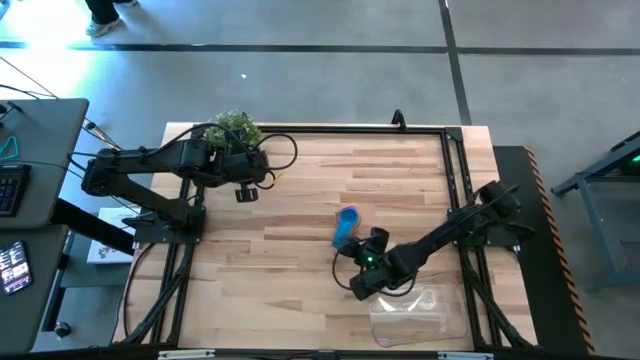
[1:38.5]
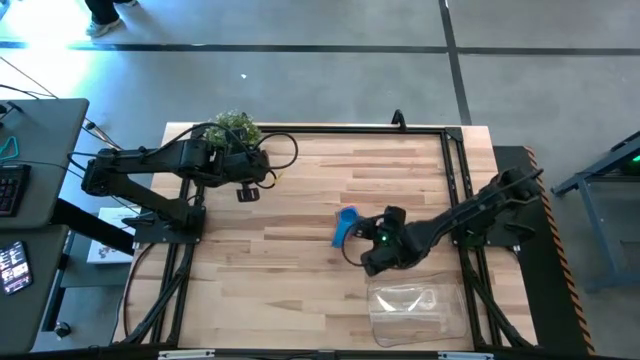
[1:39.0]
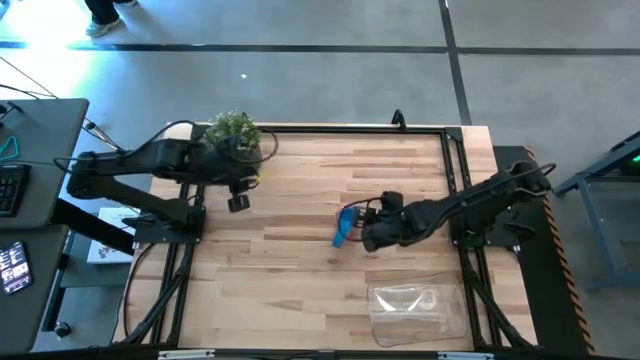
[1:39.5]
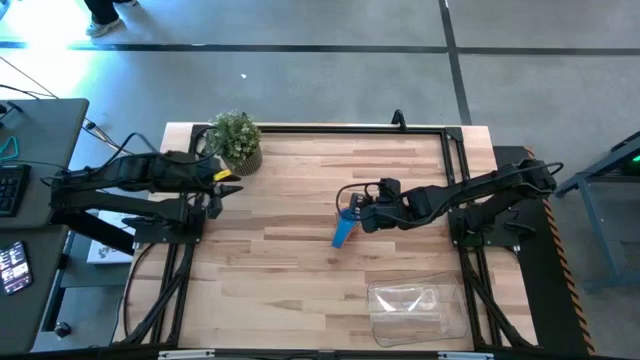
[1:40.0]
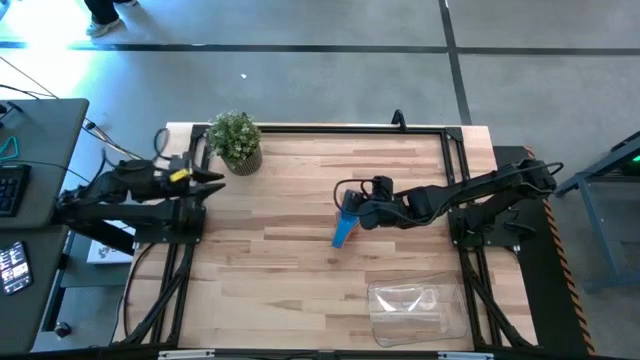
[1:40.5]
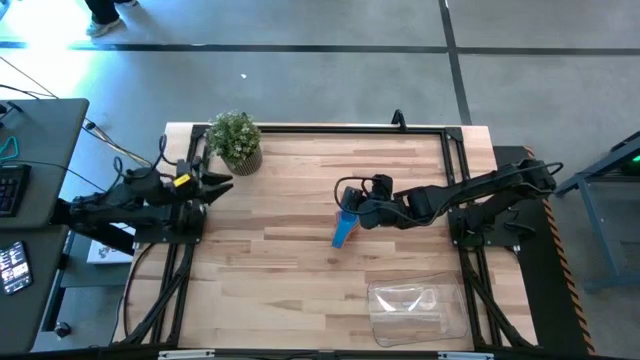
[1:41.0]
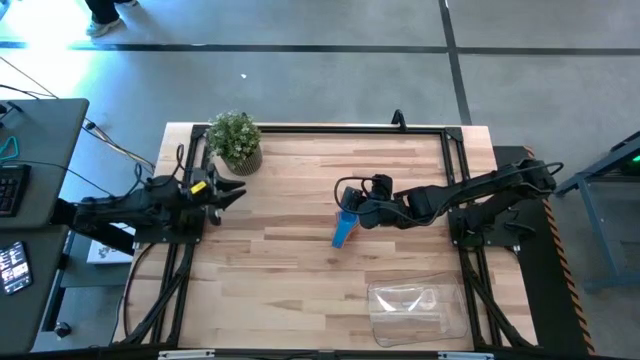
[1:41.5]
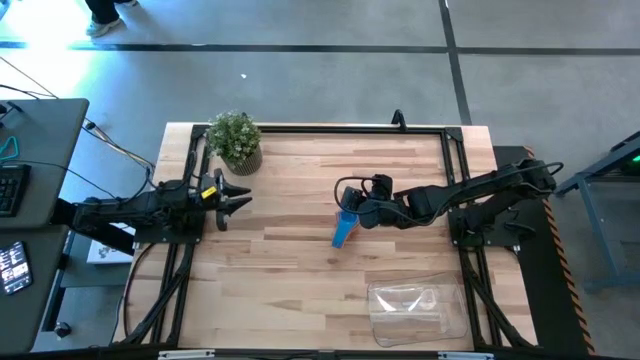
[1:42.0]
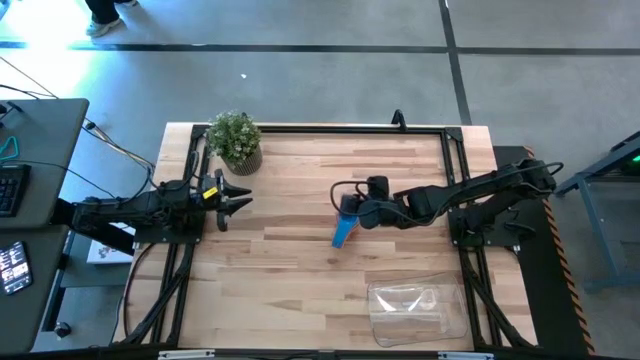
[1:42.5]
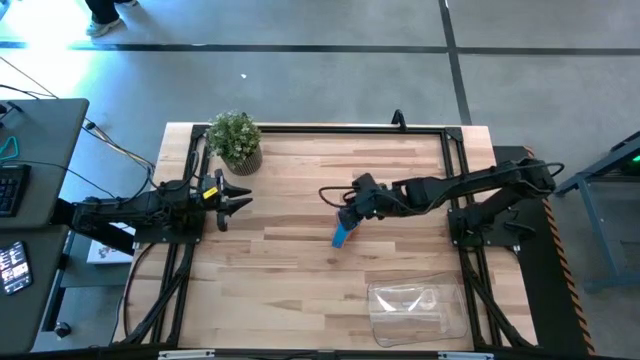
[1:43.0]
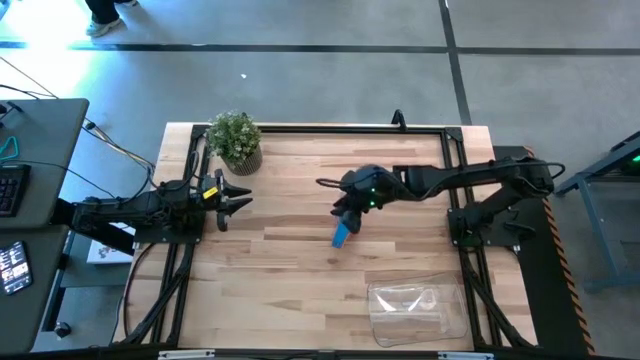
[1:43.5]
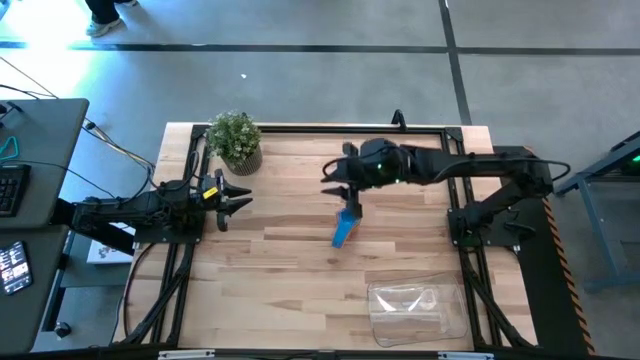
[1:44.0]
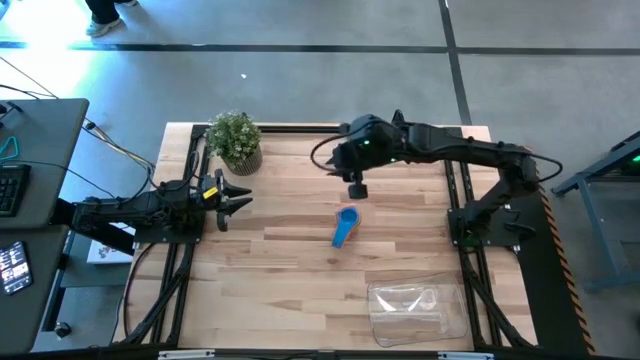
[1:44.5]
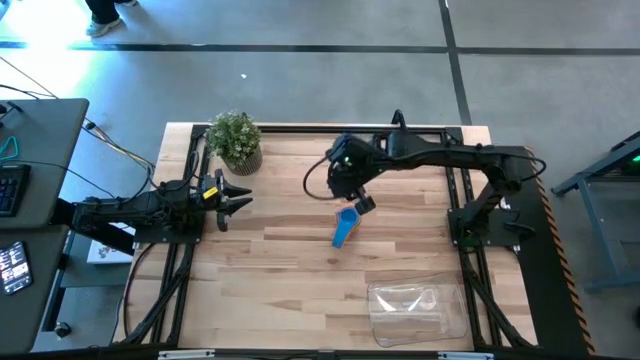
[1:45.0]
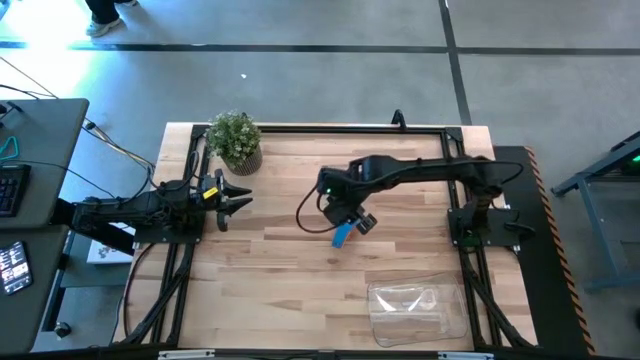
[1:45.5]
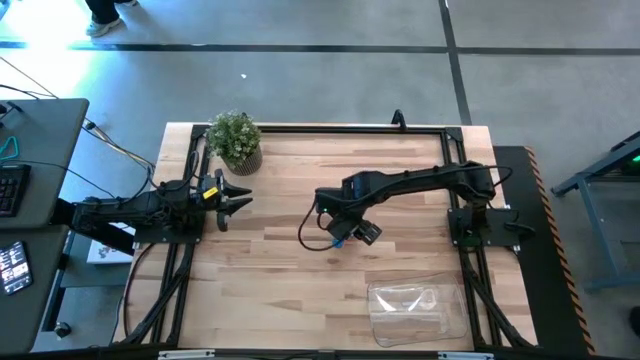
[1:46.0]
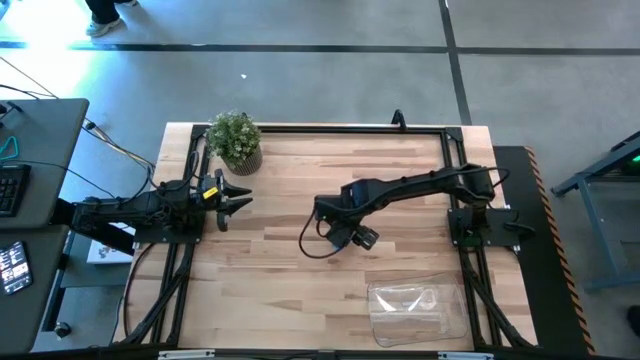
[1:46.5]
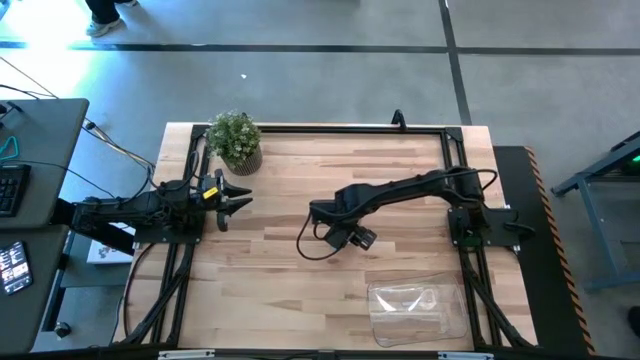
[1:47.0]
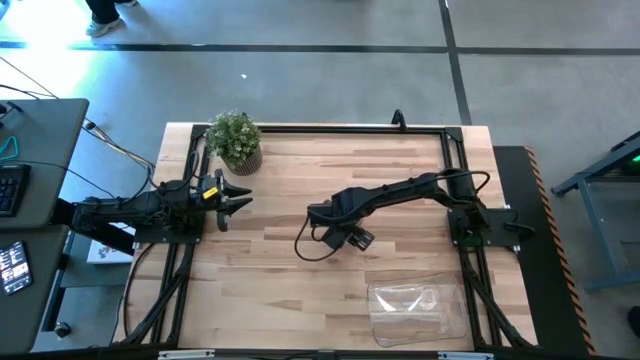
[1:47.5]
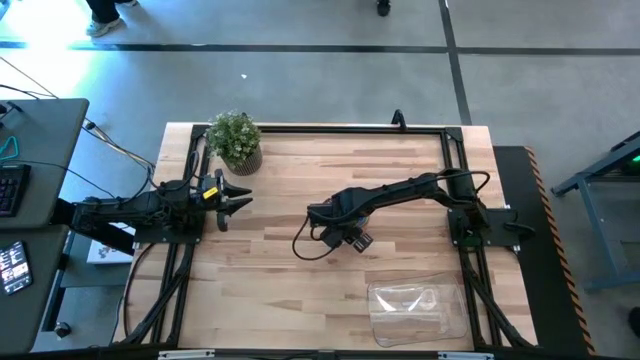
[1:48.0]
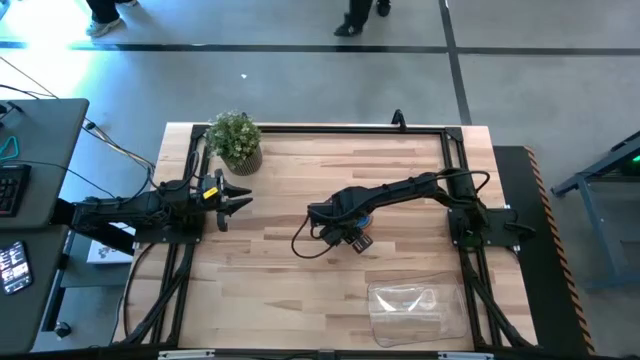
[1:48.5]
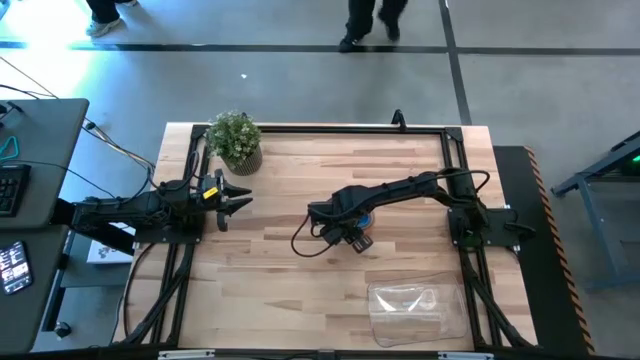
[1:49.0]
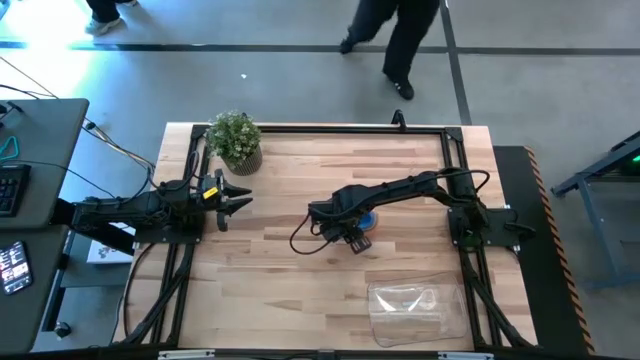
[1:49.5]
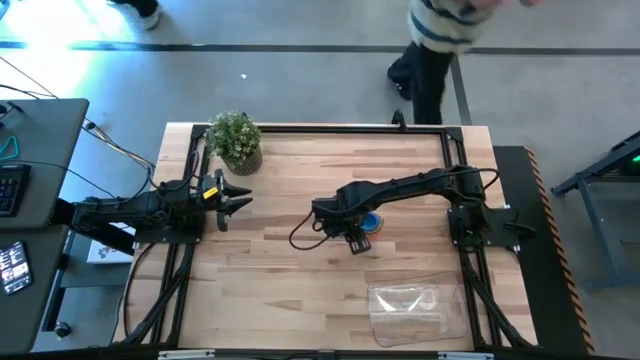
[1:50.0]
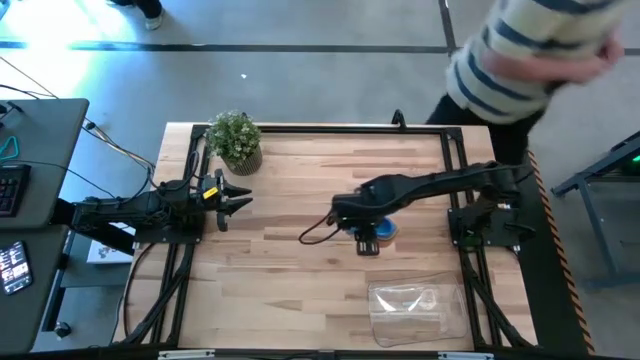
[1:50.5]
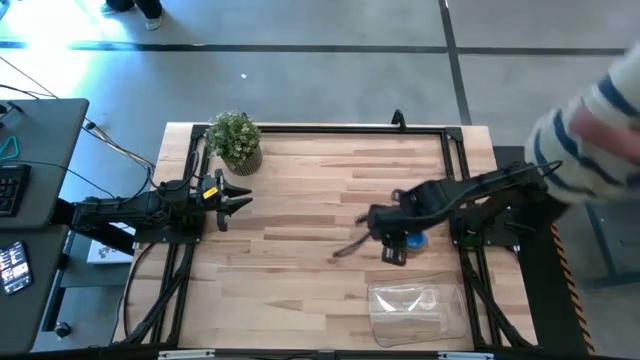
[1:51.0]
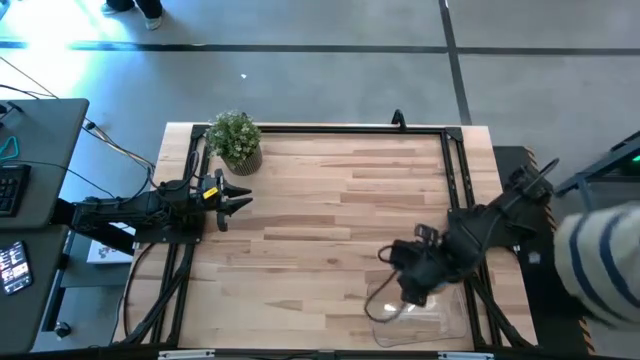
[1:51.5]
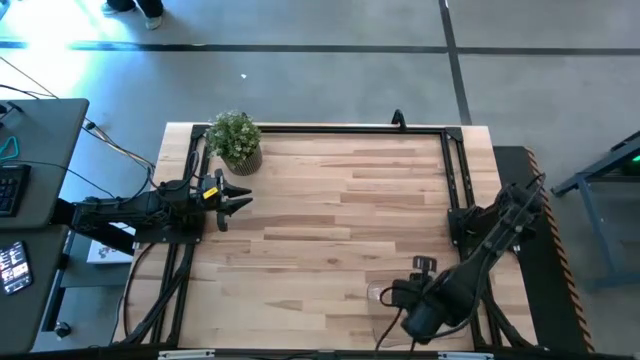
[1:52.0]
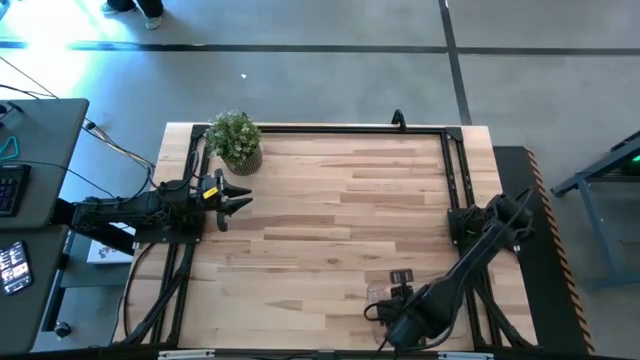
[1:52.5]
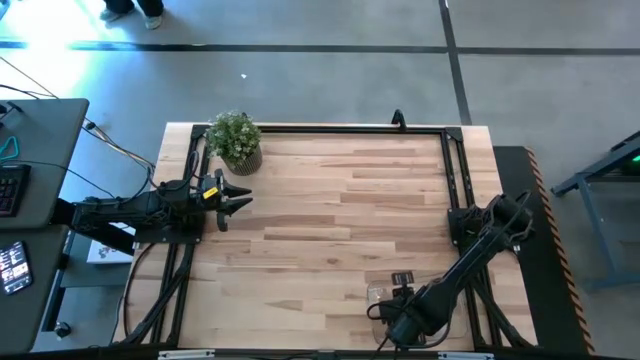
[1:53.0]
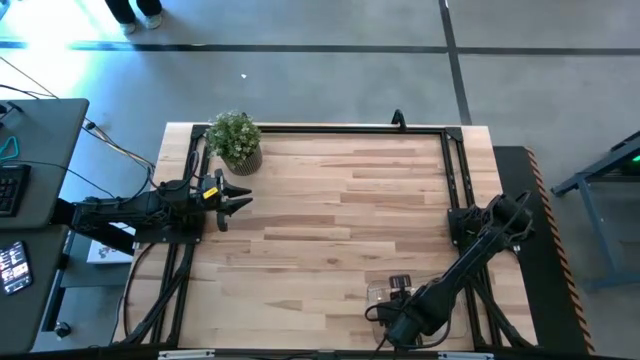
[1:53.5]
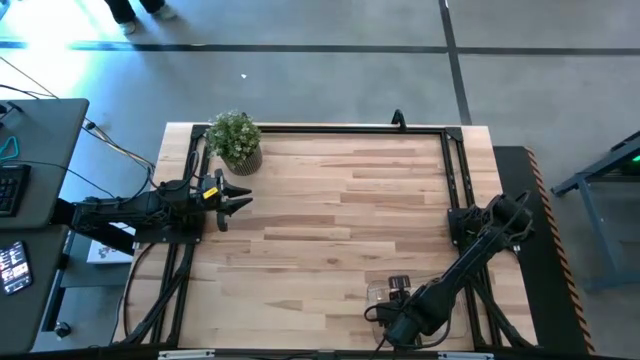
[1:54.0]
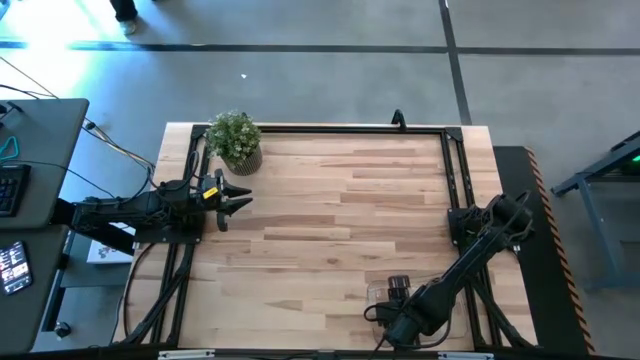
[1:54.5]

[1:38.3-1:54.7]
Task: Nest measuring cups in basket
Put the stacked measuring cups into the transparent bin

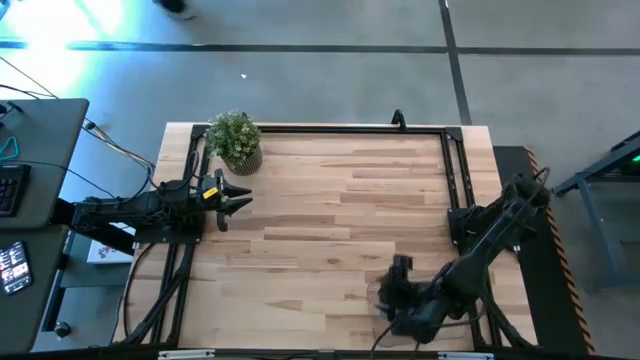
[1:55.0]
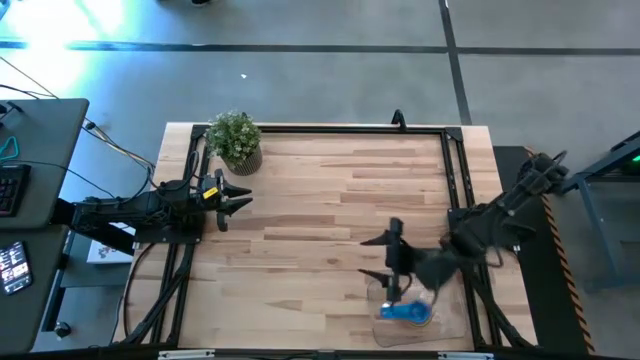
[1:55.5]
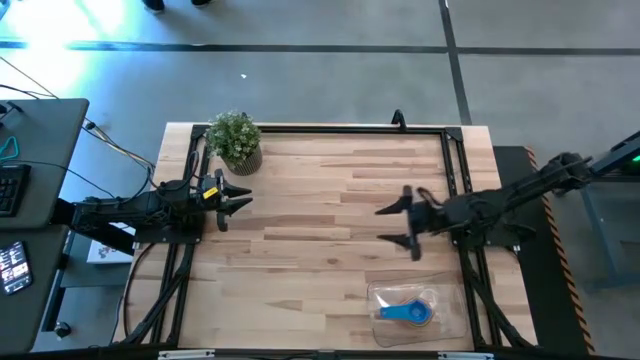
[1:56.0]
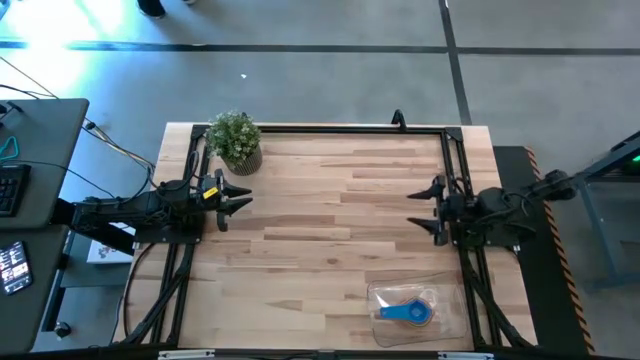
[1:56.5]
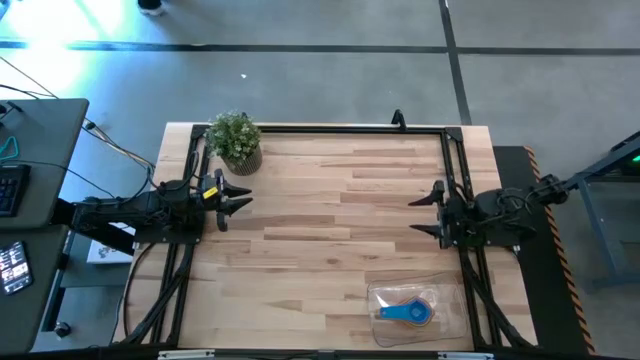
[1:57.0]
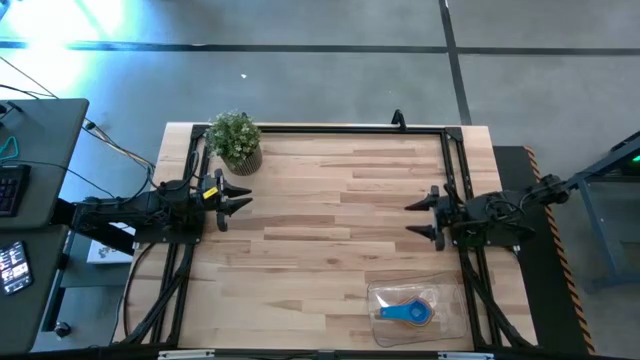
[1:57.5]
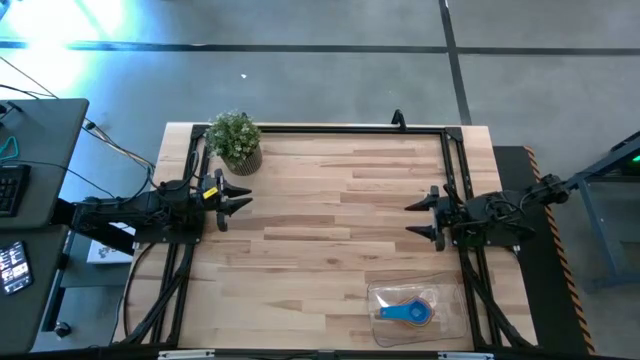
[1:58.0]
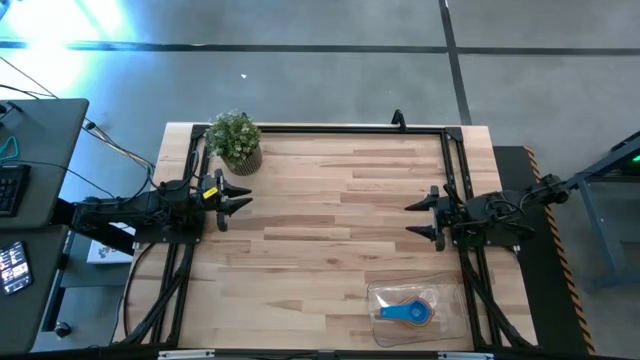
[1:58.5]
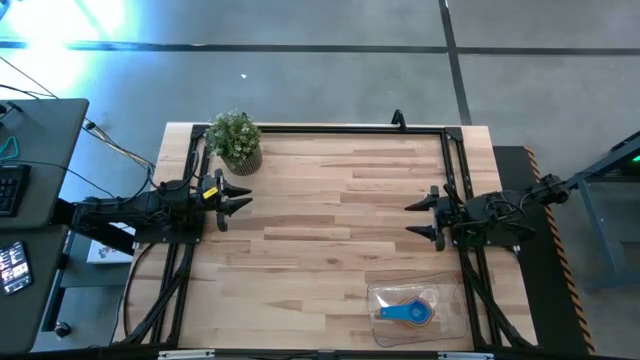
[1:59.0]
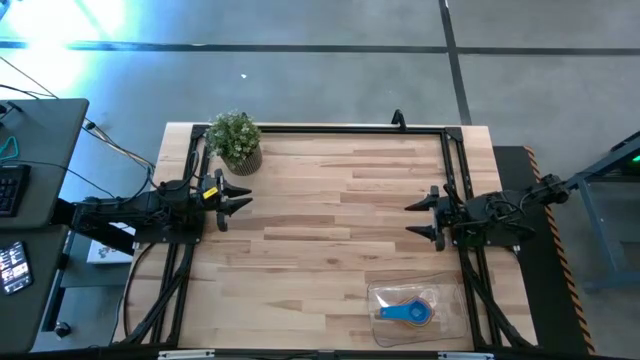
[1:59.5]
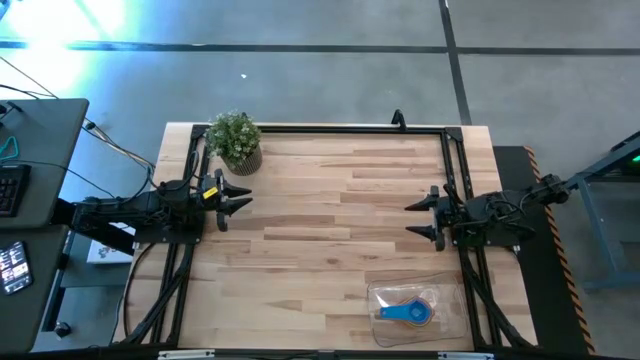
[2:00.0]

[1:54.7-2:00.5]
Return to Home Position
